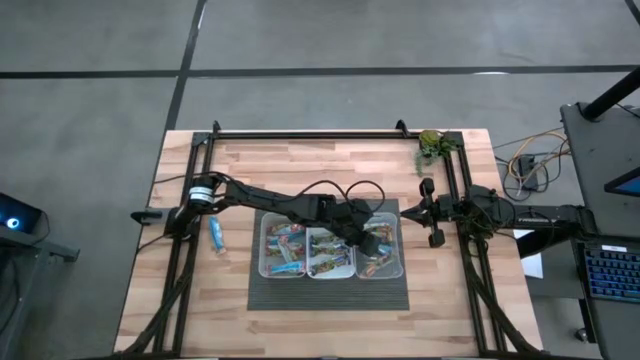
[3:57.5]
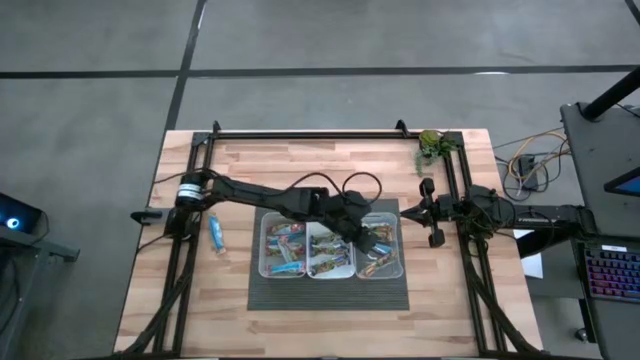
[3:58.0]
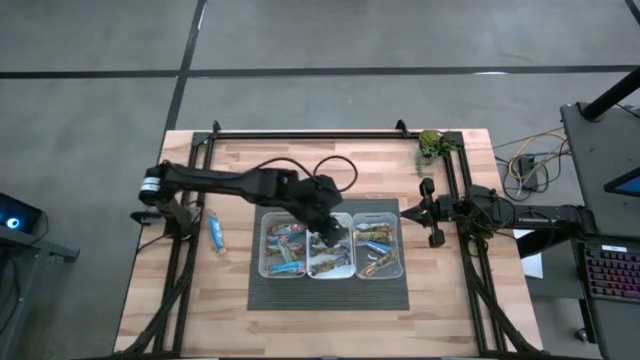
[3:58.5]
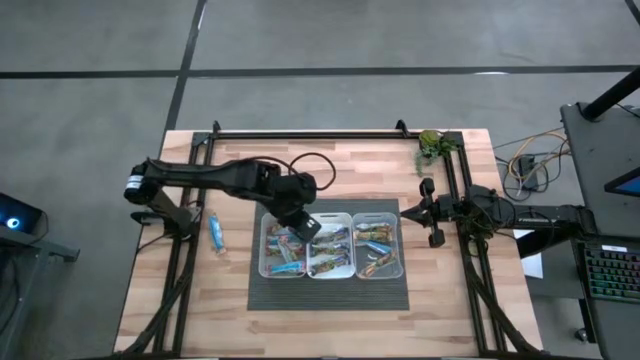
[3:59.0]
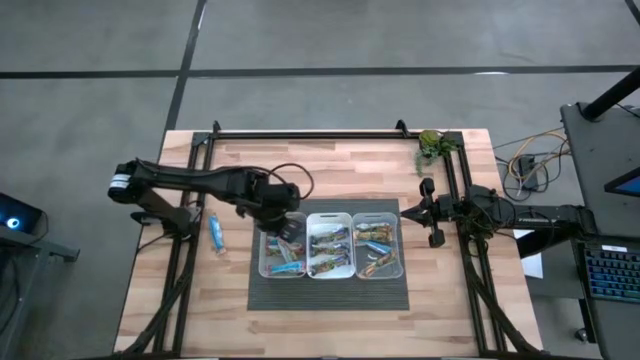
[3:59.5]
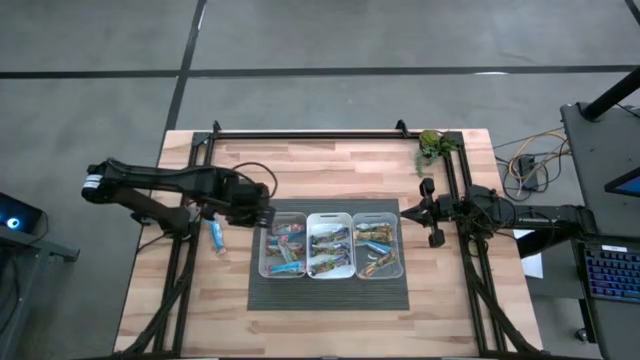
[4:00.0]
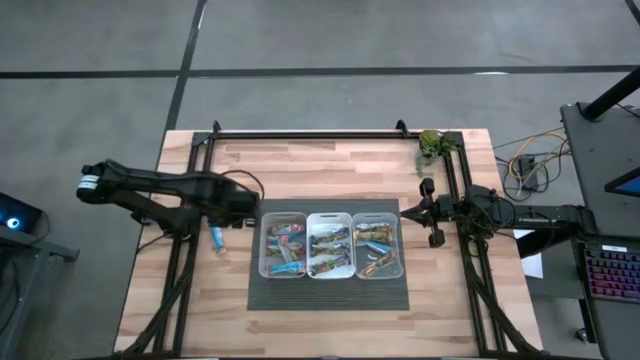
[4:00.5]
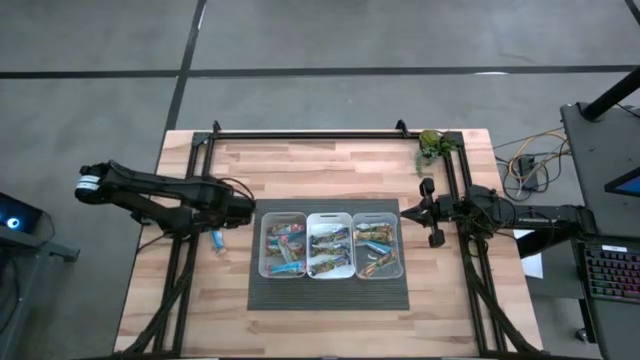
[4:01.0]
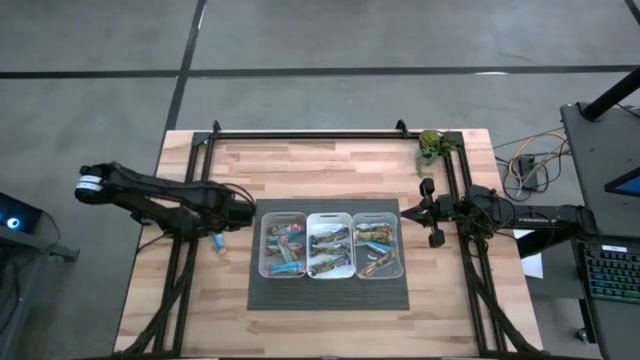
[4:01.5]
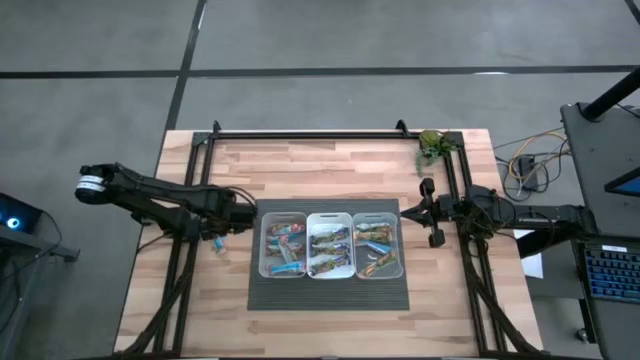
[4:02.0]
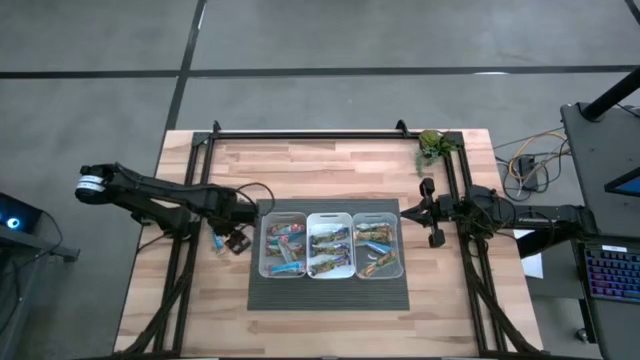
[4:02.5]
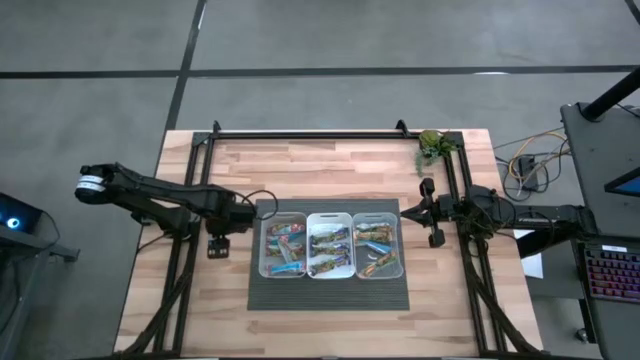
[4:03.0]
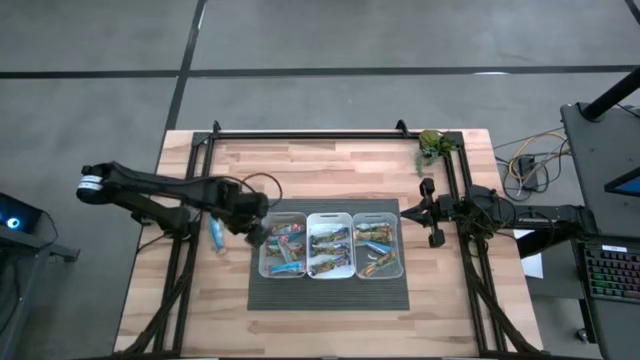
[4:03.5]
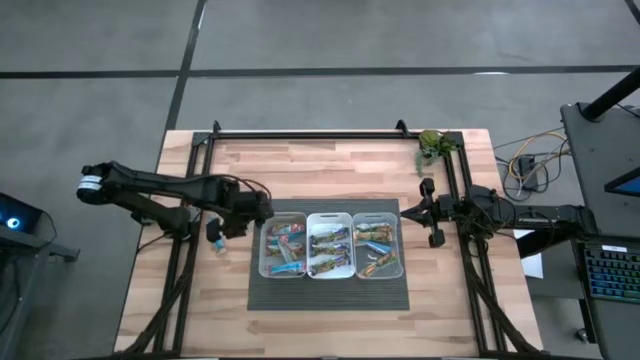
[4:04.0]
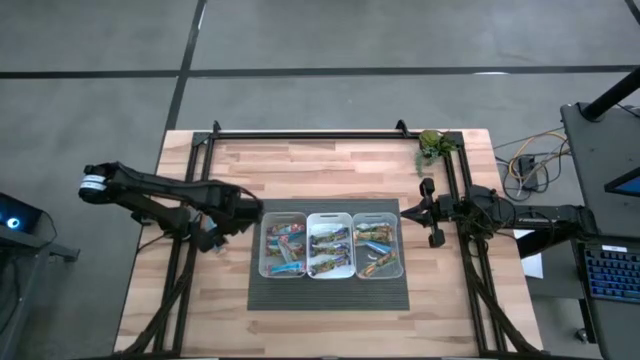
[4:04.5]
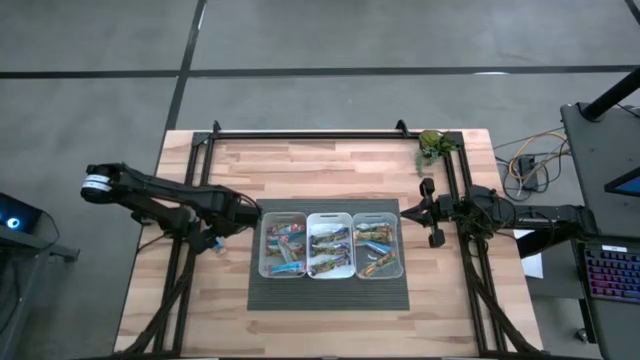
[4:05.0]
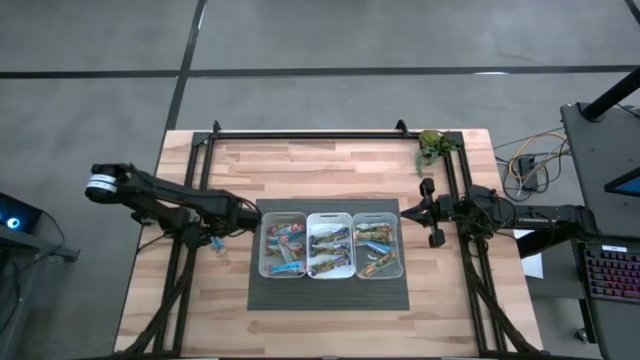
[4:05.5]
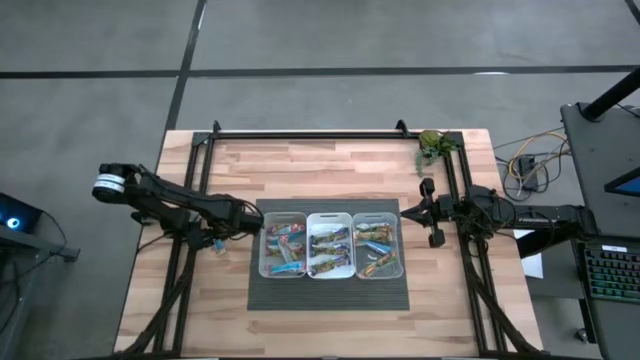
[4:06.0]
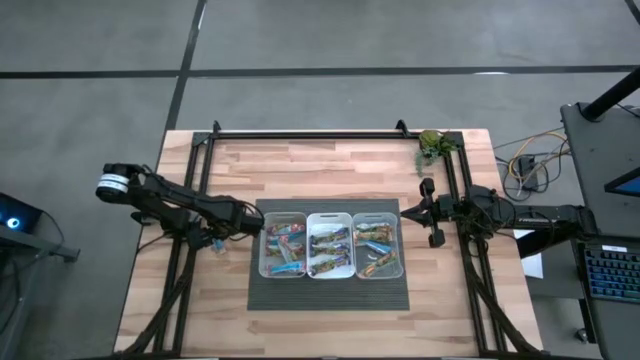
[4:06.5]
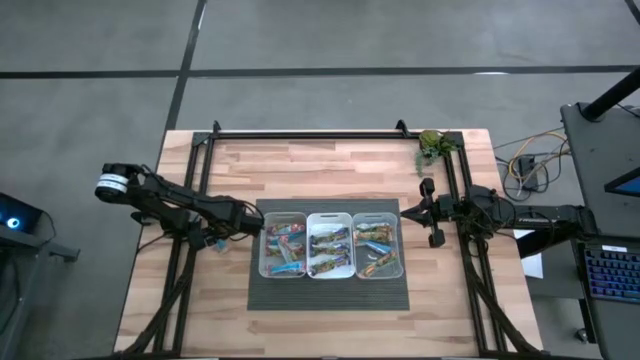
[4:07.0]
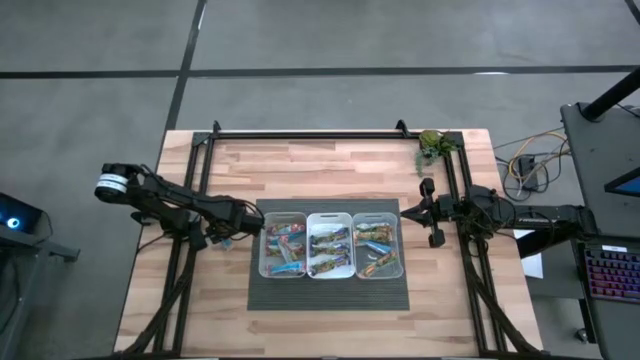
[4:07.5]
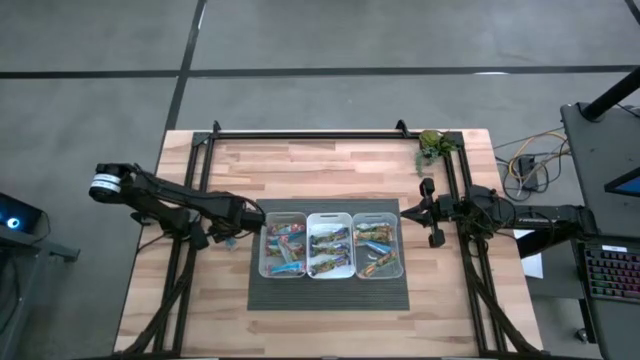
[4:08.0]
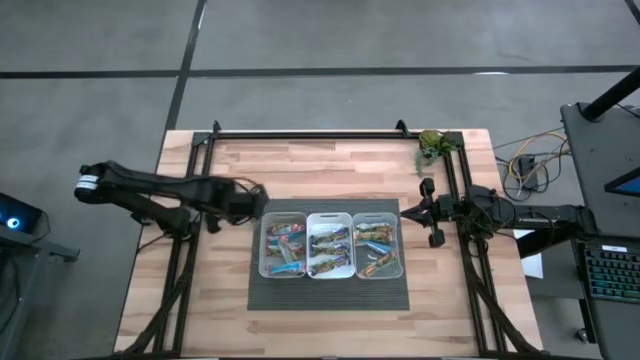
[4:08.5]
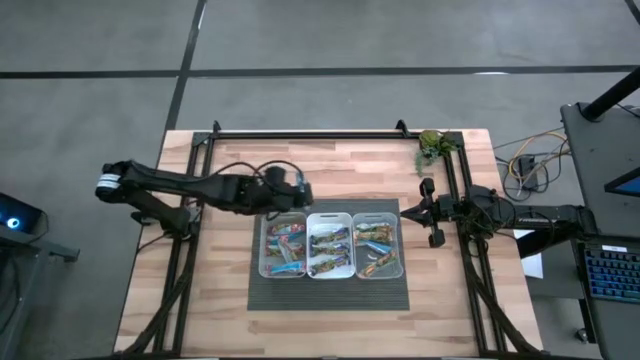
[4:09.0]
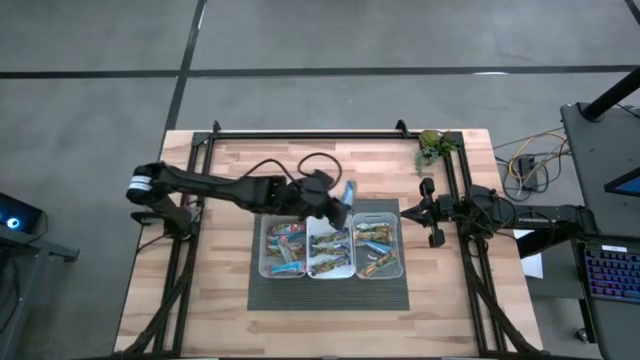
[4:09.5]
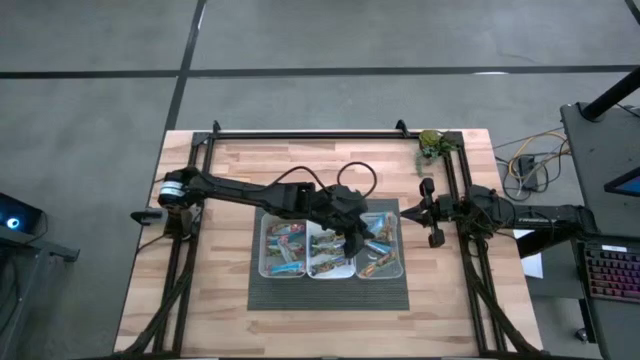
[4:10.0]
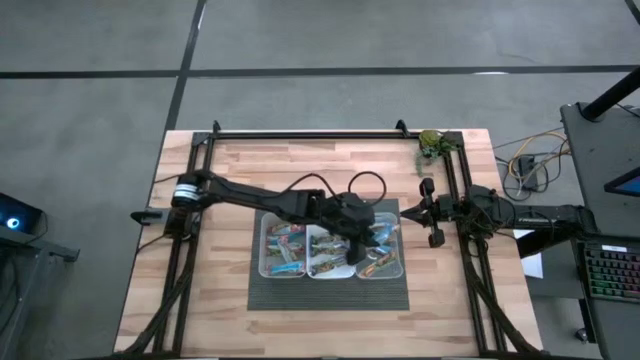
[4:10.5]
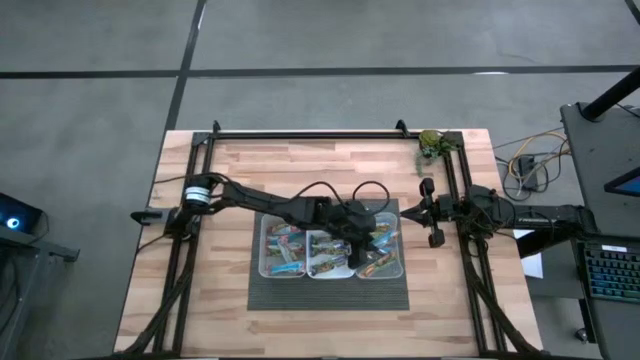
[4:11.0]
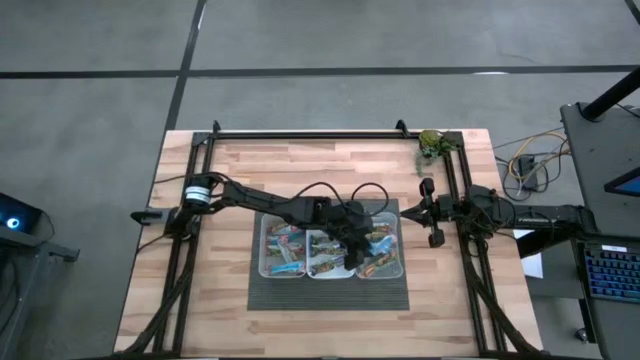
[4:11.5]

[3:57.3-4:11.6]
Task: Pick and place Granola Bars by type
Put the yellow granola bar into the transparent bin

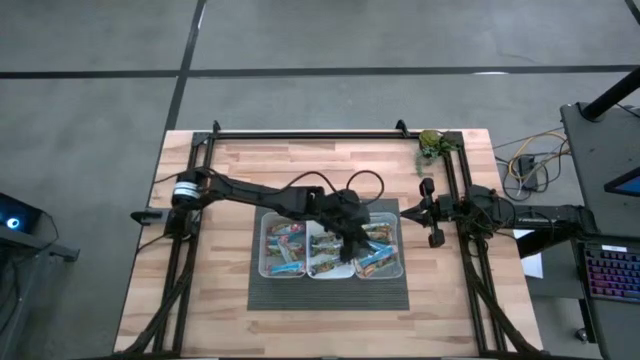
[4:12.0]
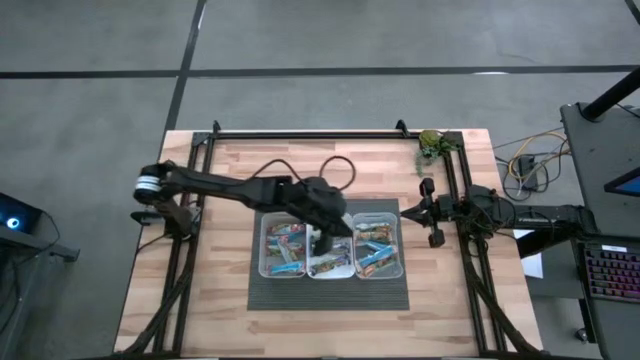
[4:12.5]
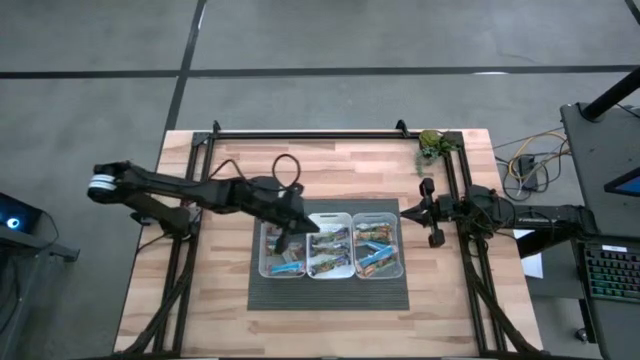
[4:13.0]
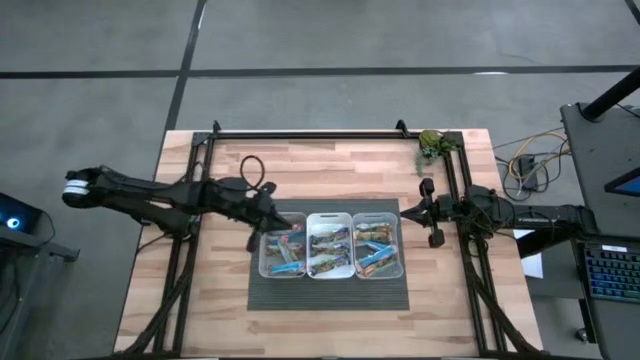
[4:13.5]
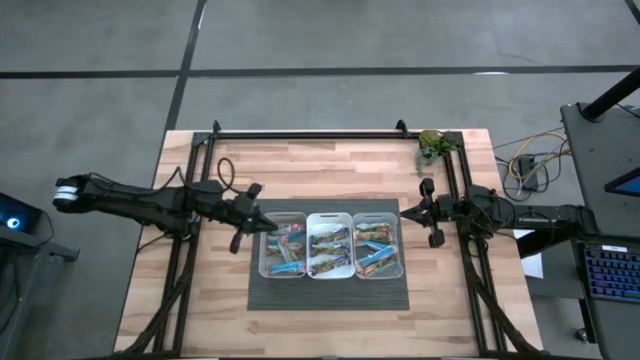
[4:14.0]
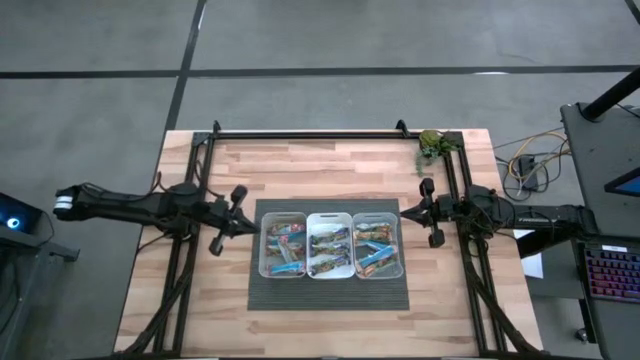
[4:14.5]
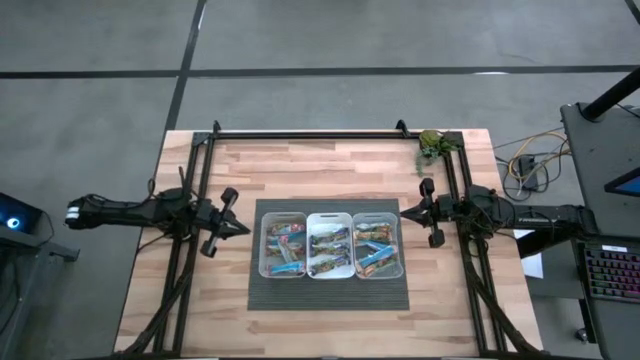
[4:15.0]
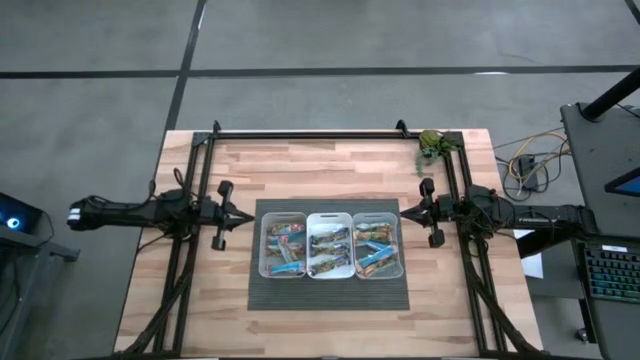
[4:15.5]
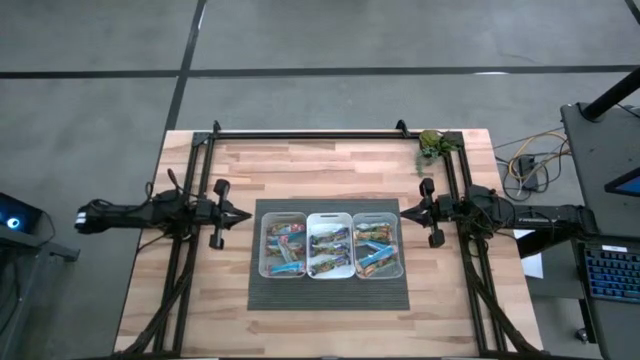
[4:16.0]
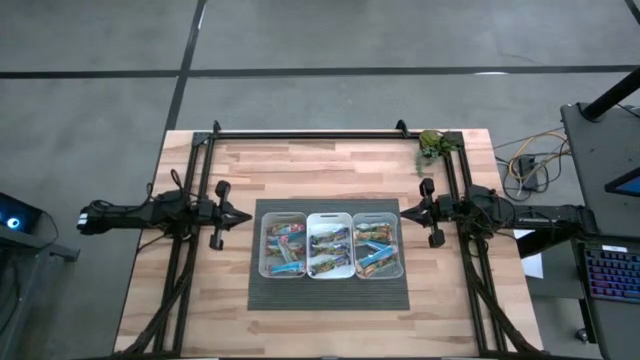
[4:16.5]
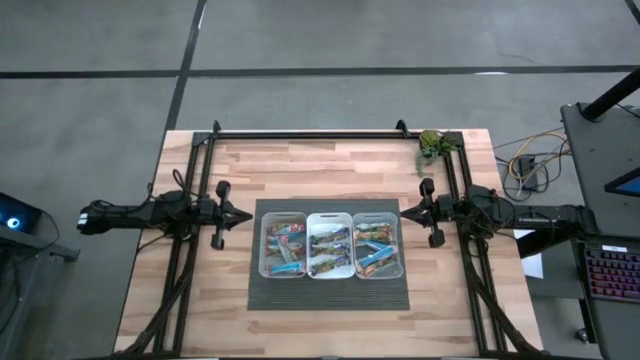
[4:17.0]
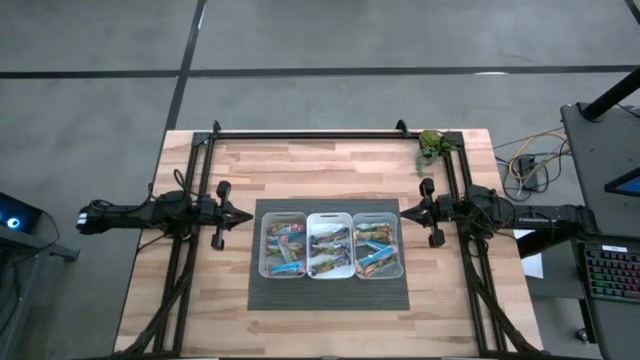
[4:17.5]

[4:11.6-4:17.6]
Return to Home Position

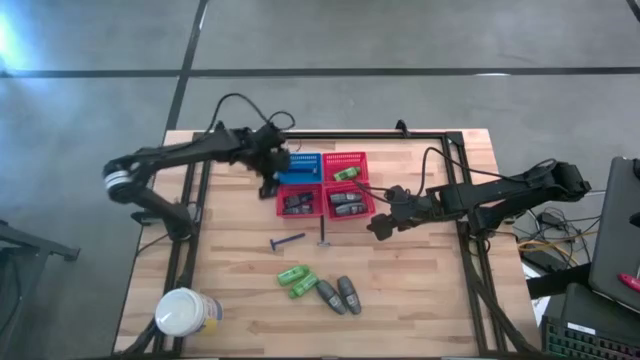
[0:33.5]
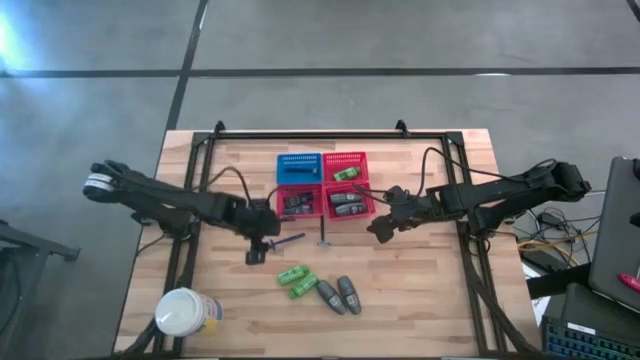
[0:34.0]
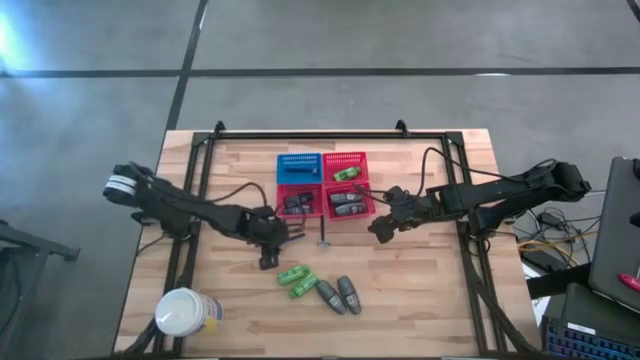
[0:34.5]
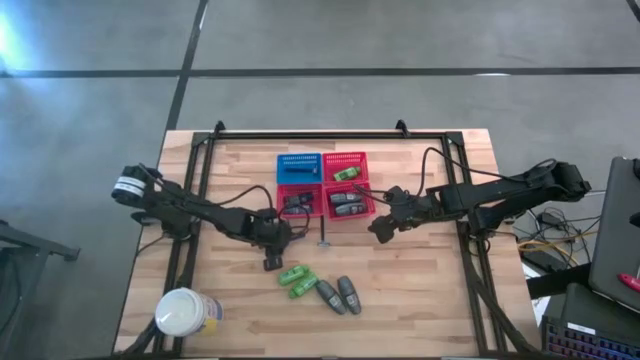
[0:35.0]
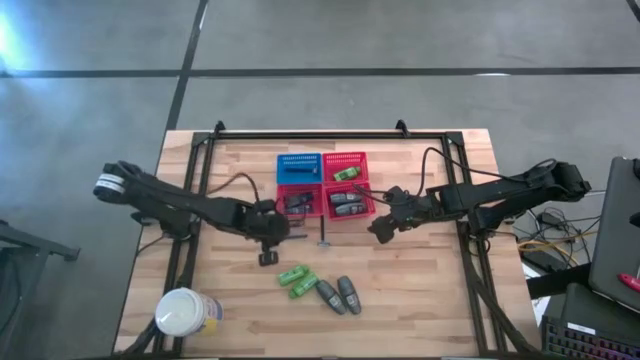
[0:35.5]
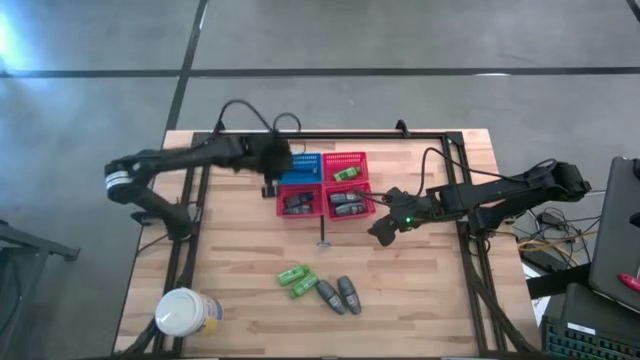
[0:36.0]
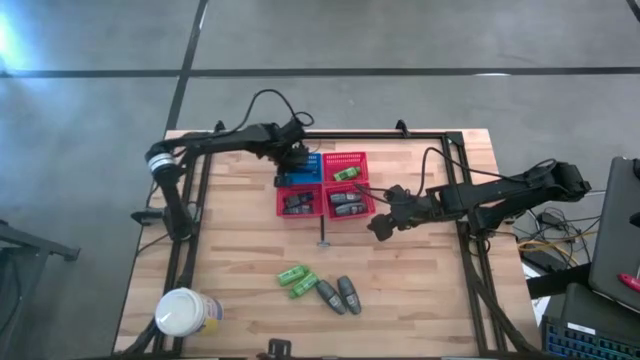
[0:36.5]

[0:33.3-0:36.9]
Task: Pick & Place Travel size toiletries
Put the razor into the blue bin
